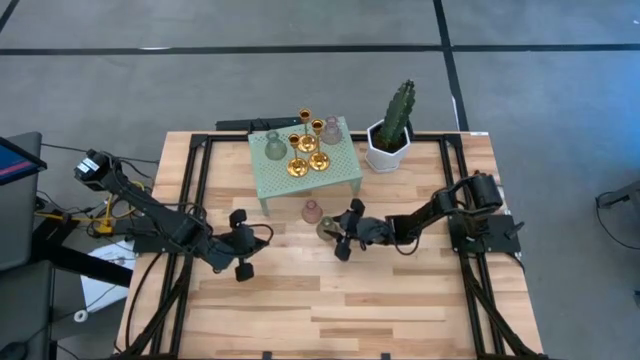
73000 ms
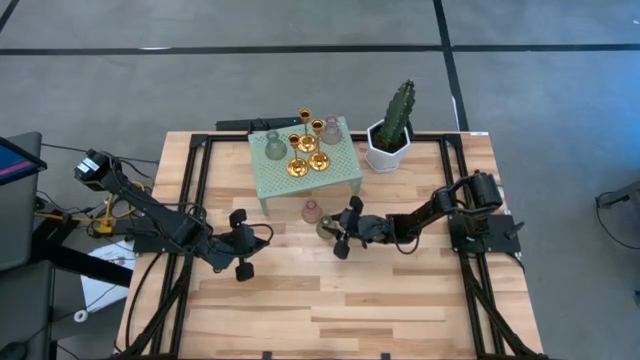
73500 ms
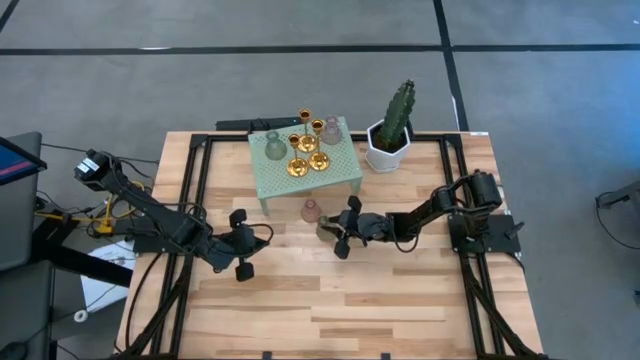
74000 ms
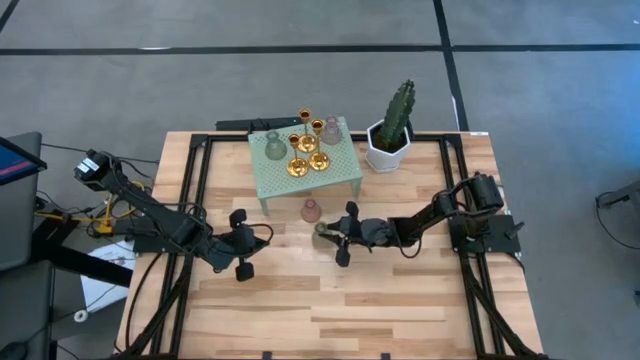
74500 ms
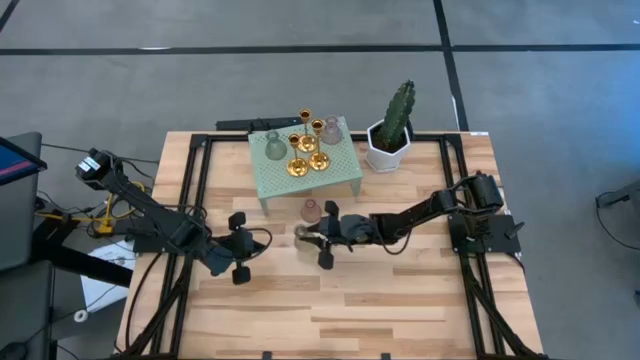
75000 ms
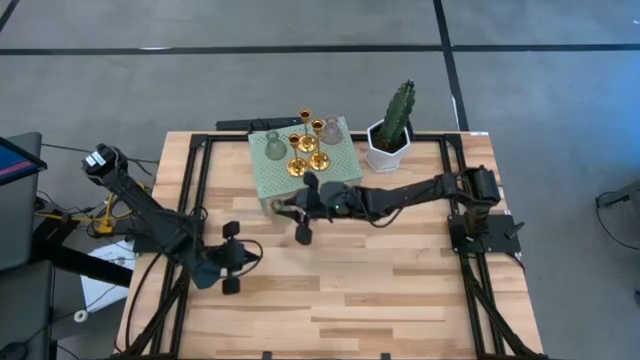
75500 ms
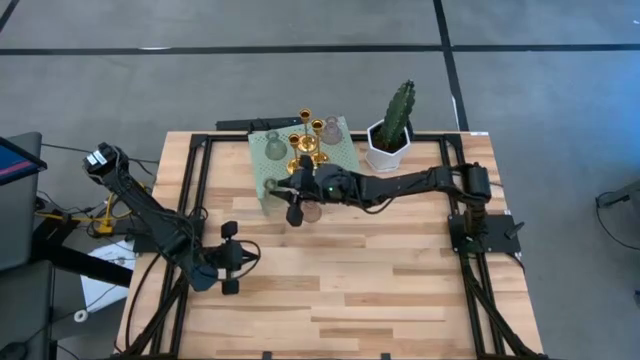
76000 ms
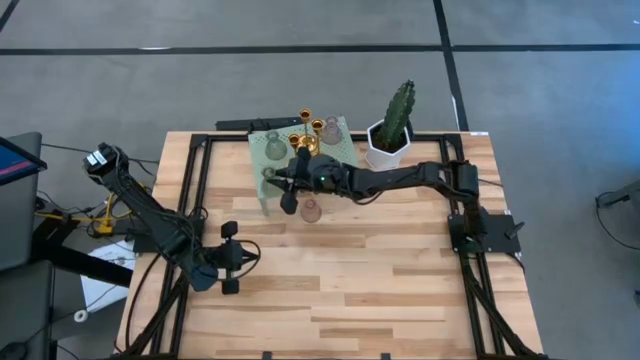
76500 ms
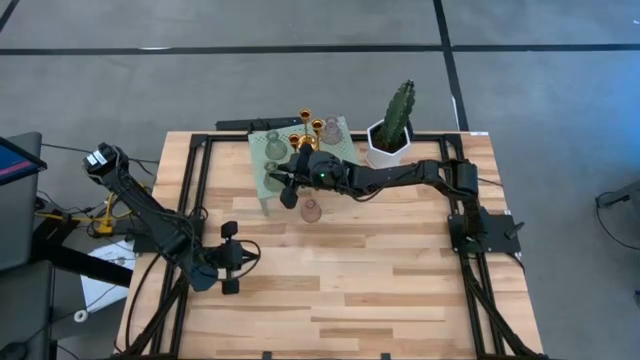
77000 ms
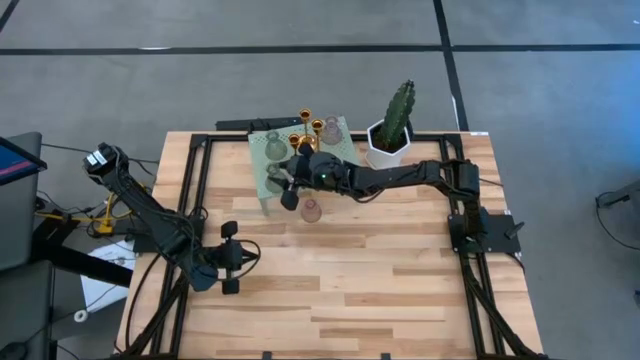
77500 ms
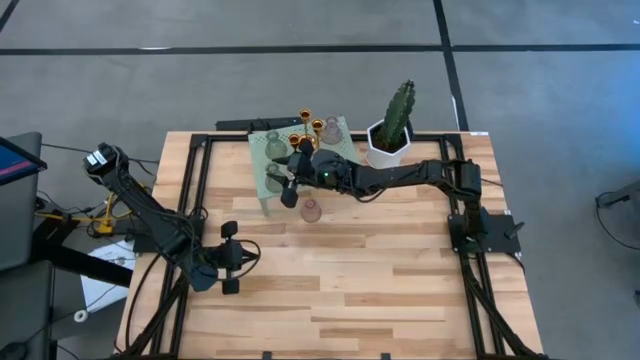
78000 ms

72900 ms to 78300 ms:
Task: Pick & Place candle stick holders
Put the green glass candle holder on the shelf

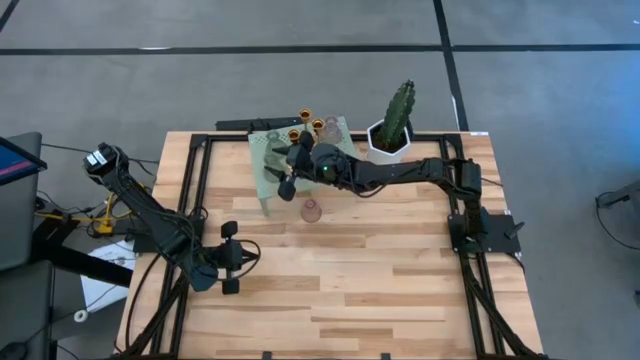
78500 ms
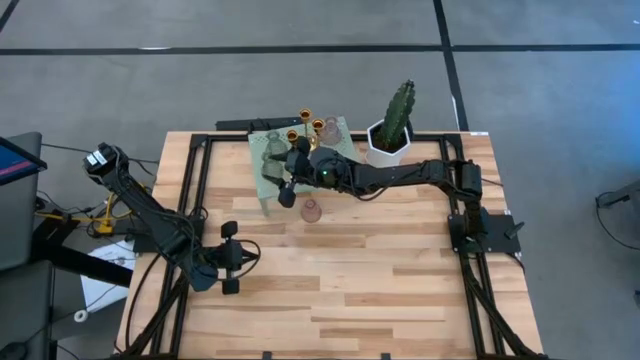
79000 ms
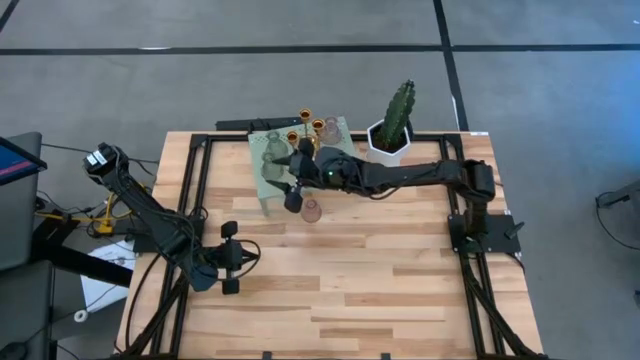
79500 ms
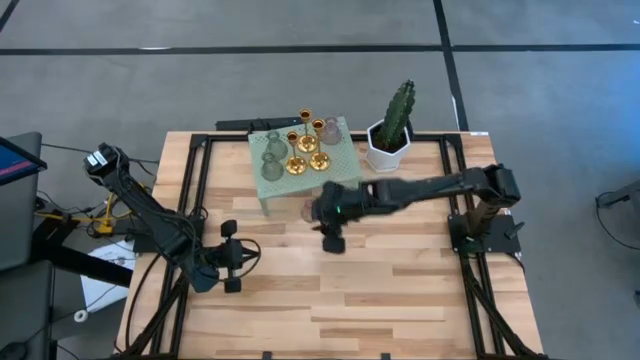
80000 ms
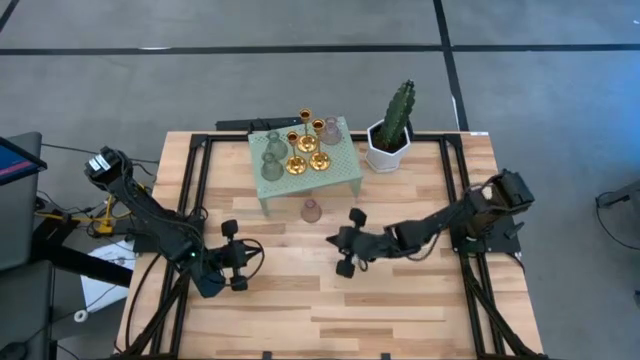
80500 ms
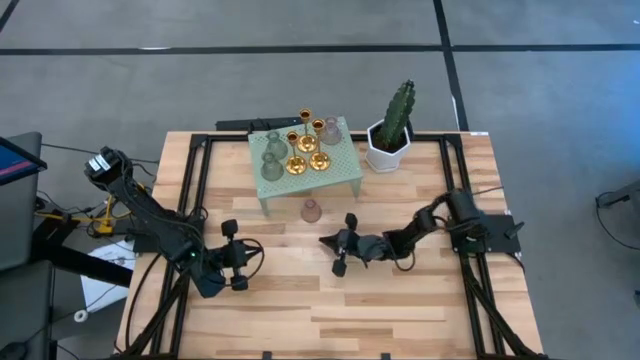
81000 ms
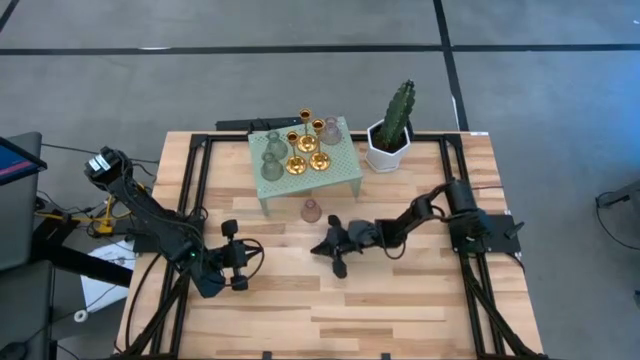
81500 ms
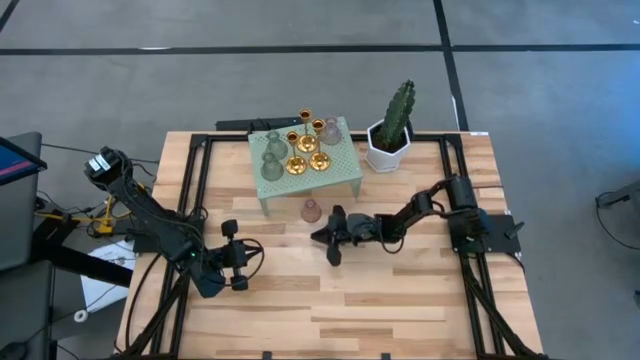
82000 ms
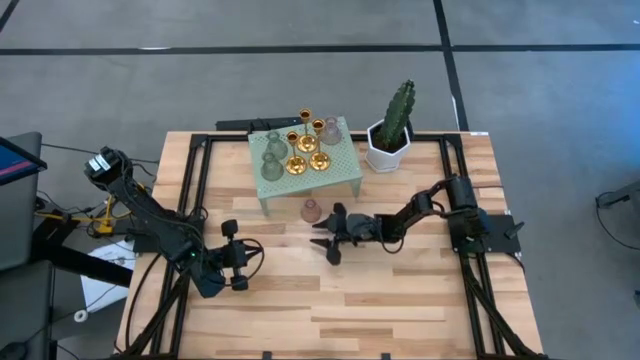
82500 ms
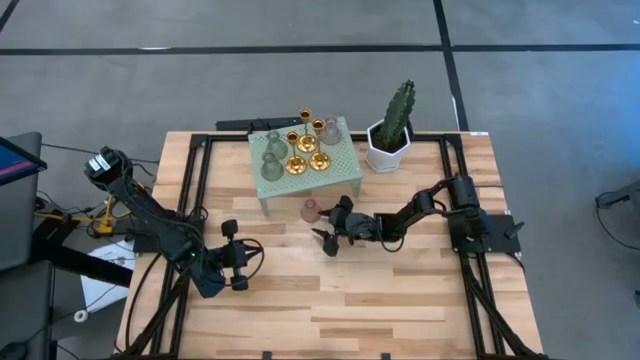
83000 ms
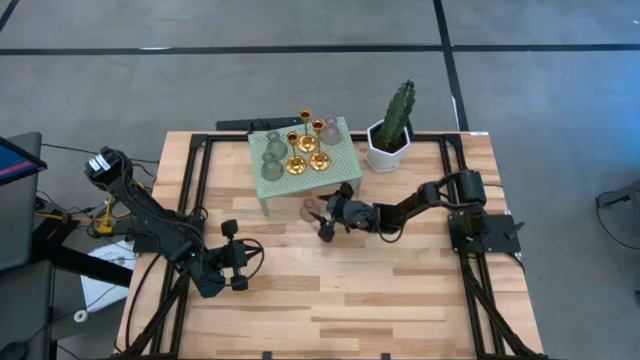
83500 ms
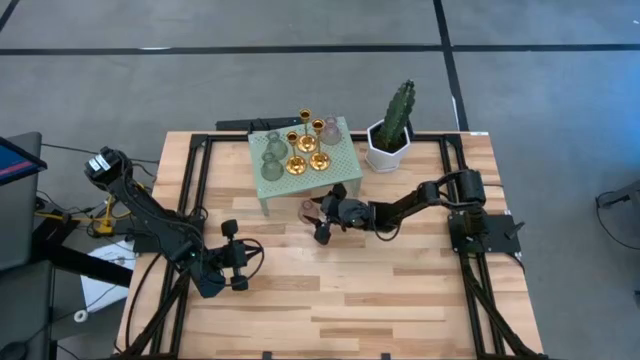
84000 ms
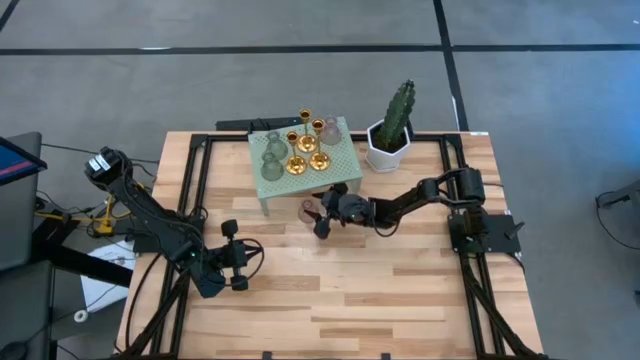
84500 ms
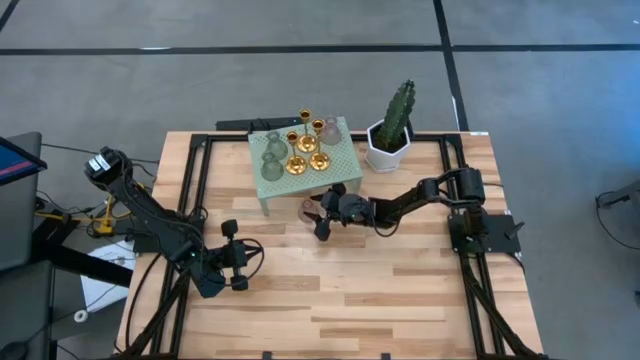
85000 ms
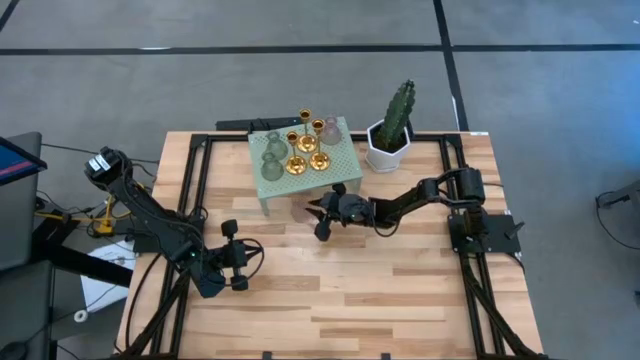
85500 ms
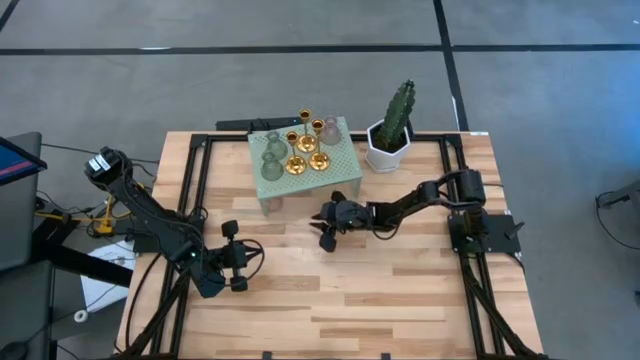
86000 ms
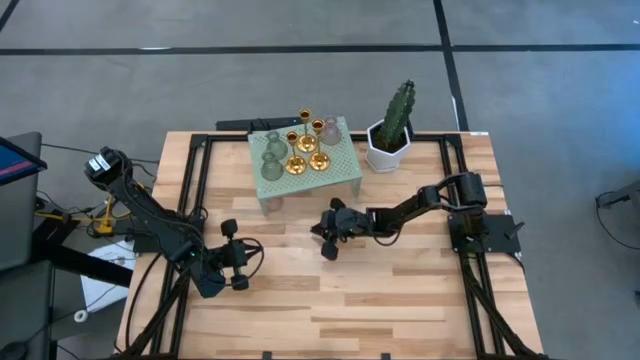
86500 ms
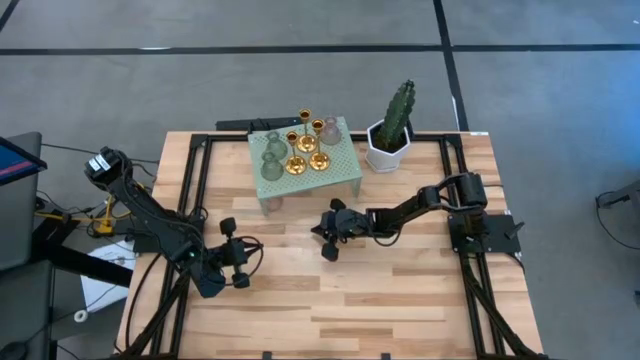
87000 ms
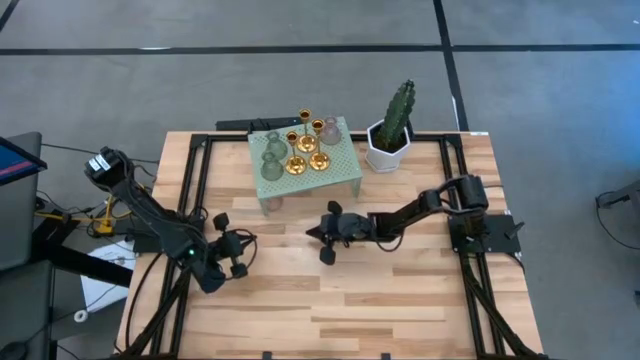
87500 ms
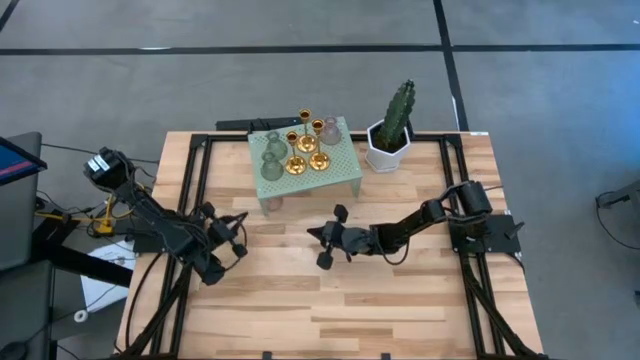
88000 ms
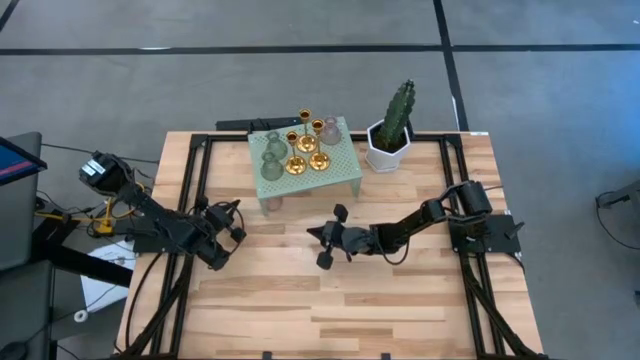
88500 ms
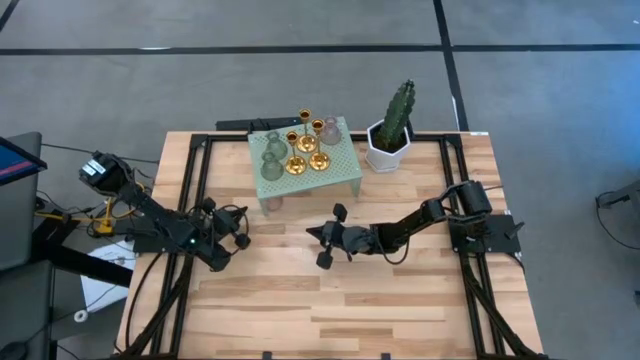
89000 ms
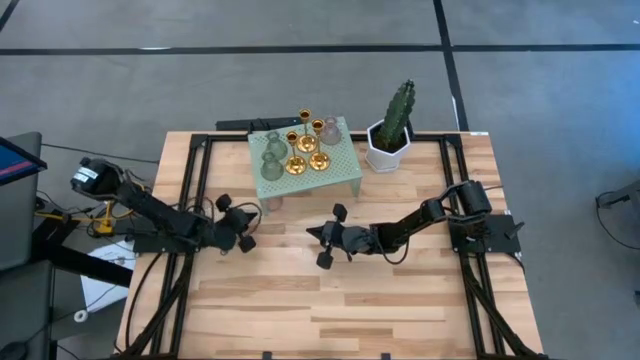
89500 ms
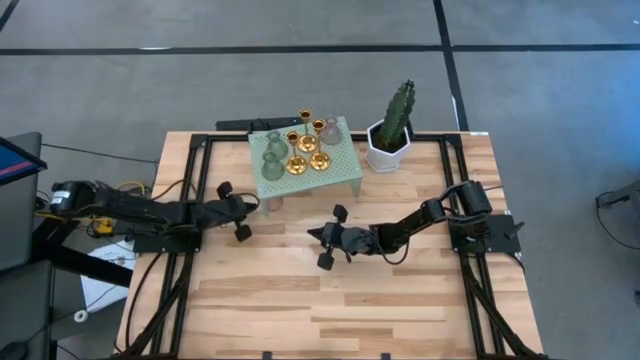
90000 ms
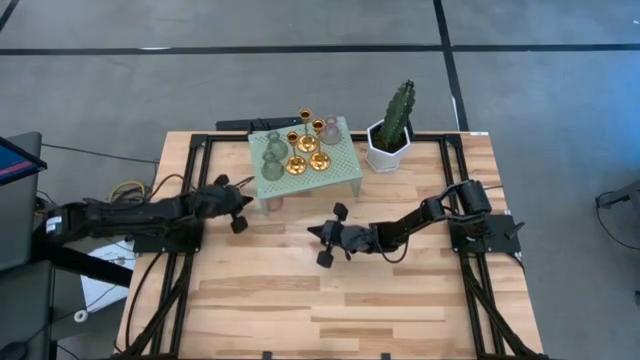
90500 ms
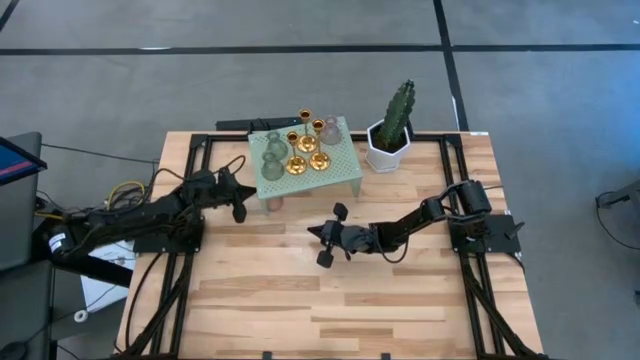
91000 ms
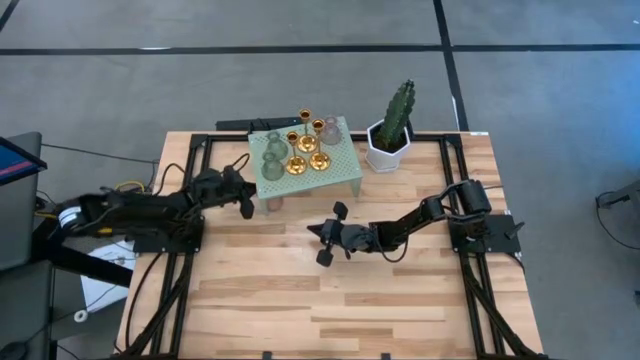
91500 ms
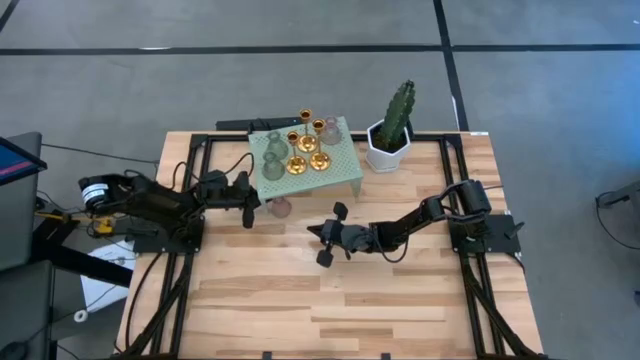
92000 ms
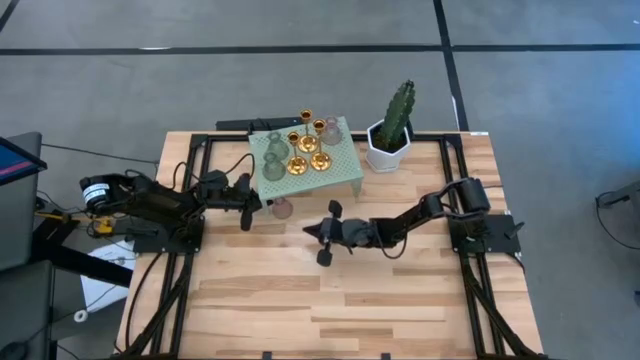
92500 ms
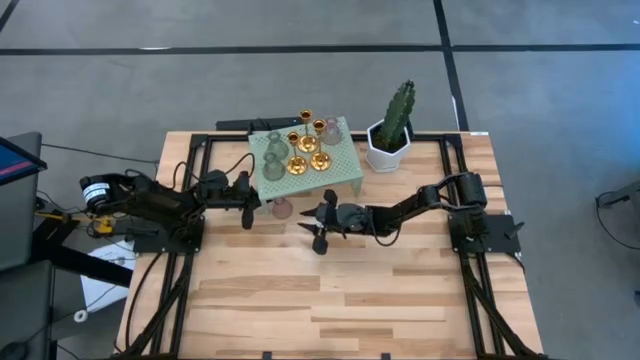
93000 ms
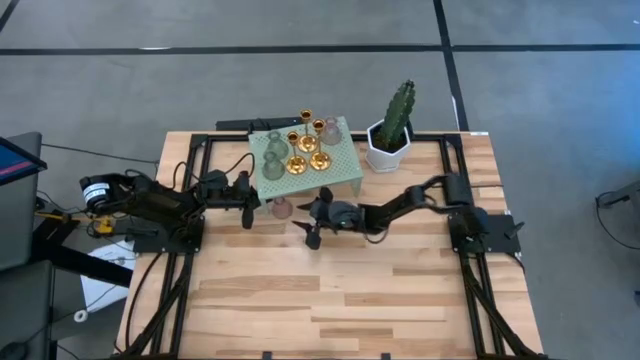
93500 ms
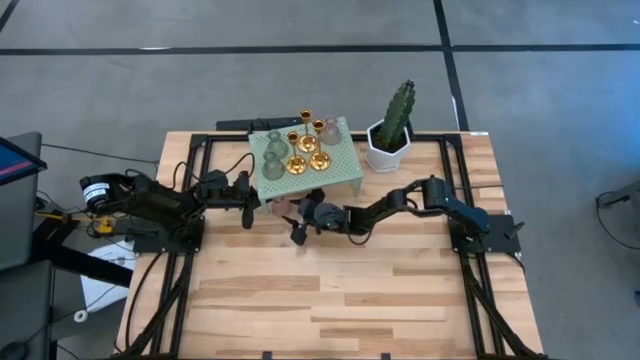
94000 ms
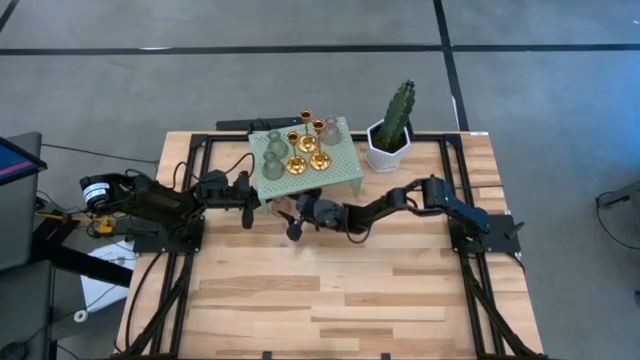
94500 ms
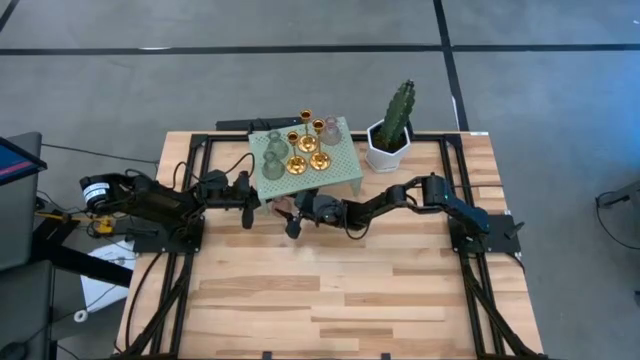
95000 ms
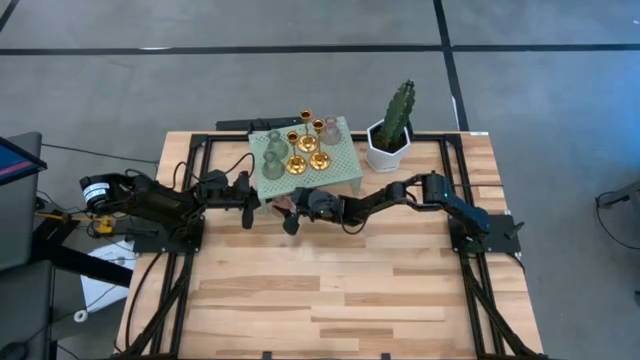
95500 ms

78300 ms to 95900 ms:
Put the pink glass candle holder on the shelf
